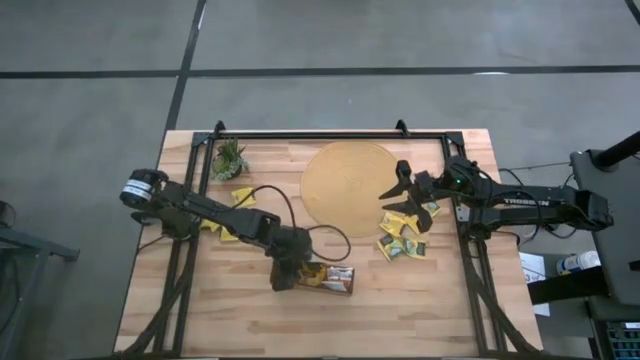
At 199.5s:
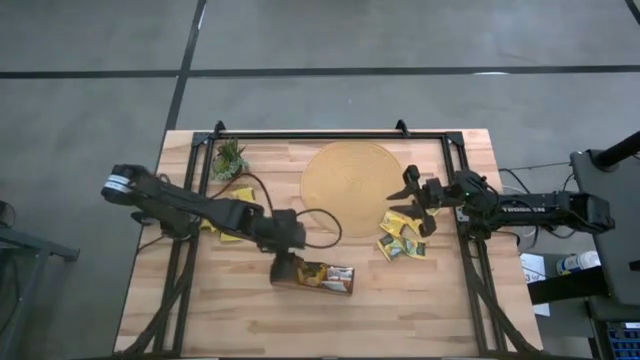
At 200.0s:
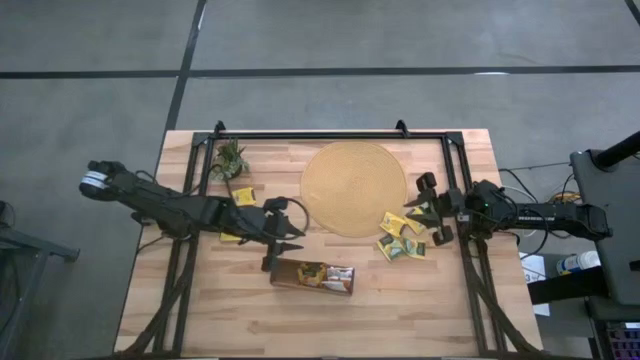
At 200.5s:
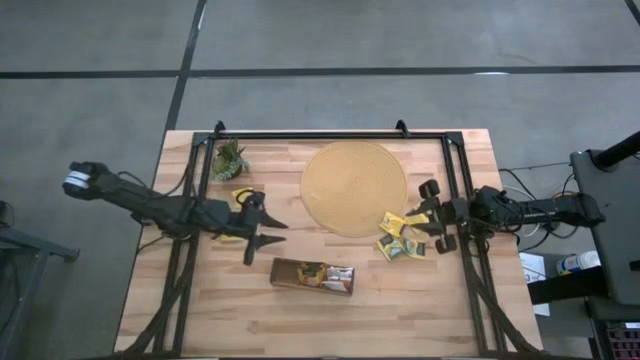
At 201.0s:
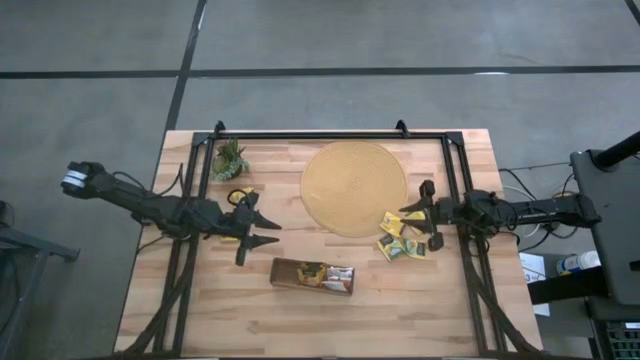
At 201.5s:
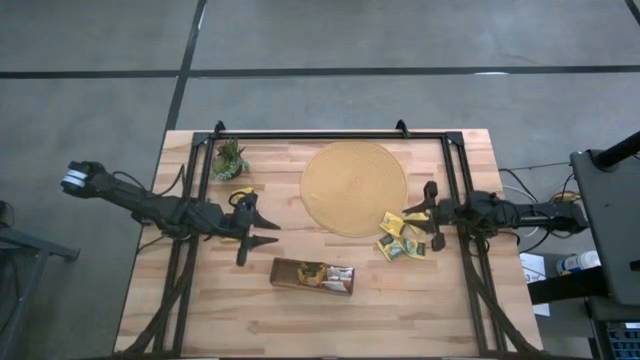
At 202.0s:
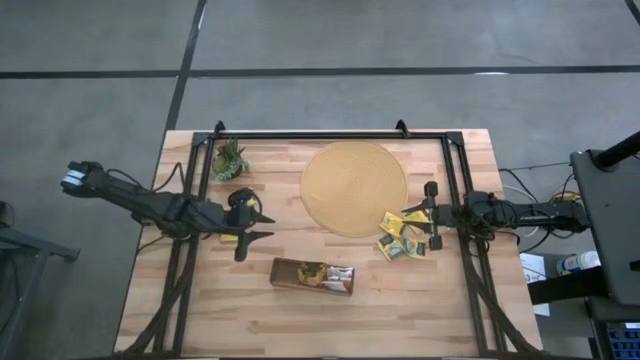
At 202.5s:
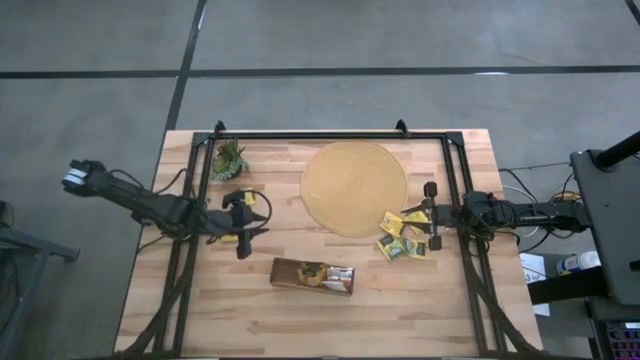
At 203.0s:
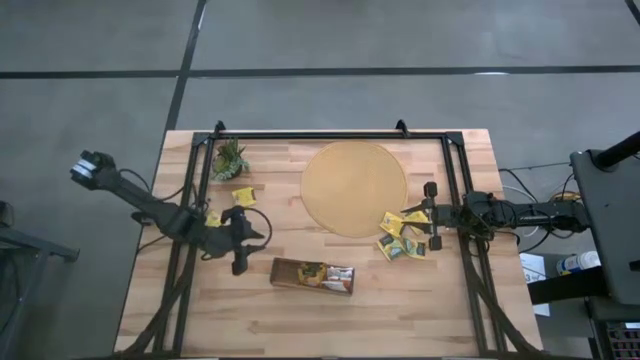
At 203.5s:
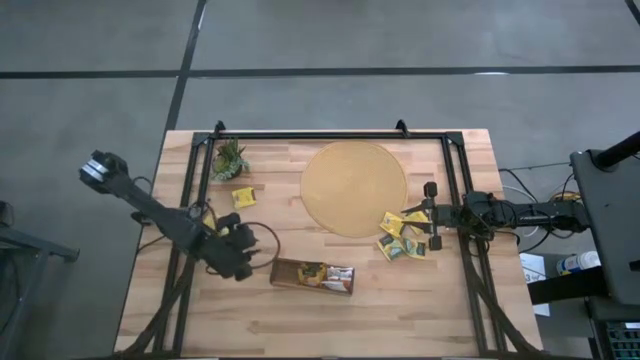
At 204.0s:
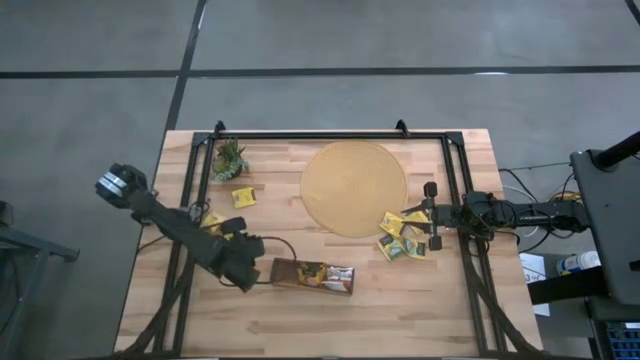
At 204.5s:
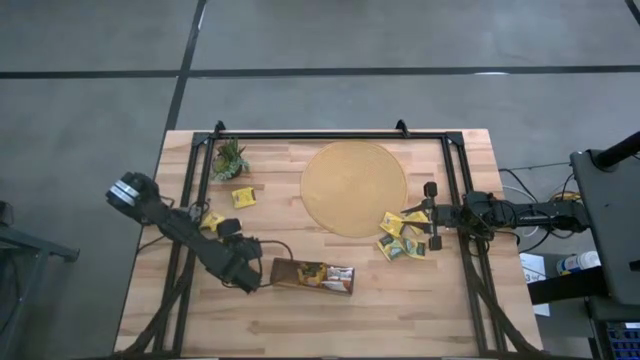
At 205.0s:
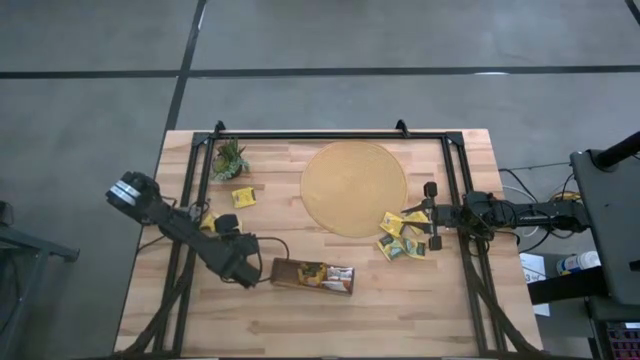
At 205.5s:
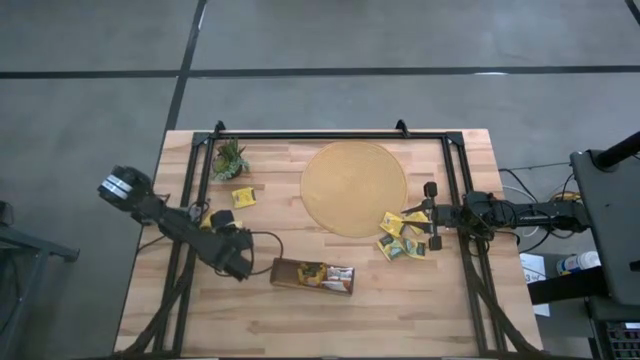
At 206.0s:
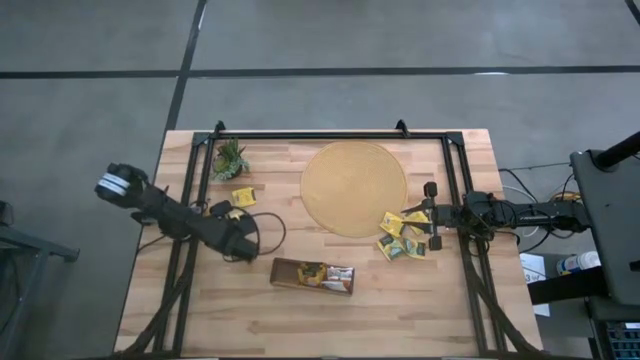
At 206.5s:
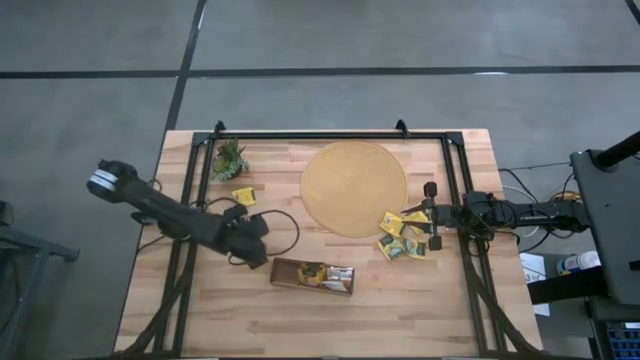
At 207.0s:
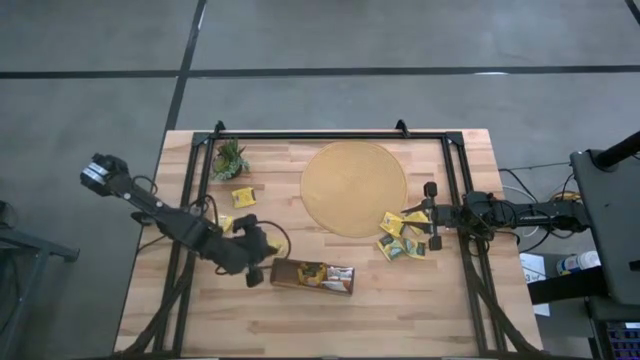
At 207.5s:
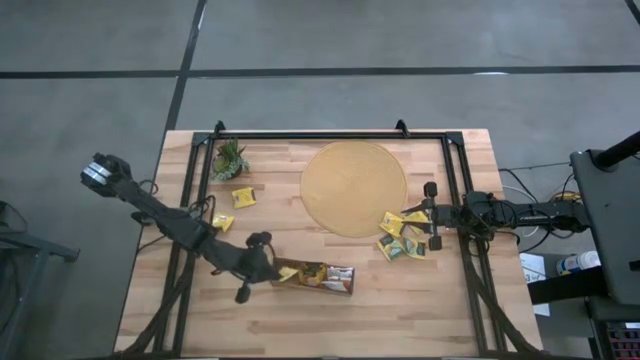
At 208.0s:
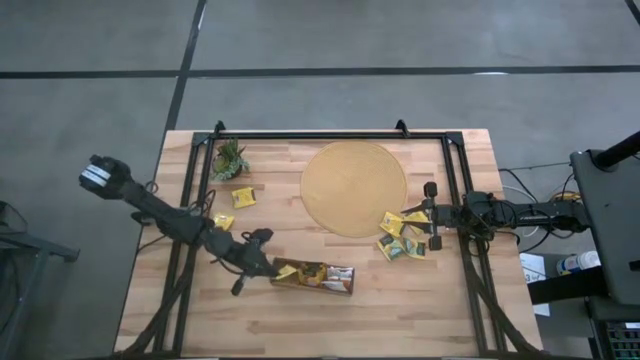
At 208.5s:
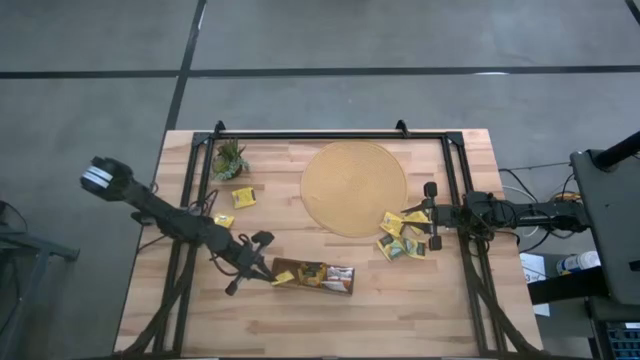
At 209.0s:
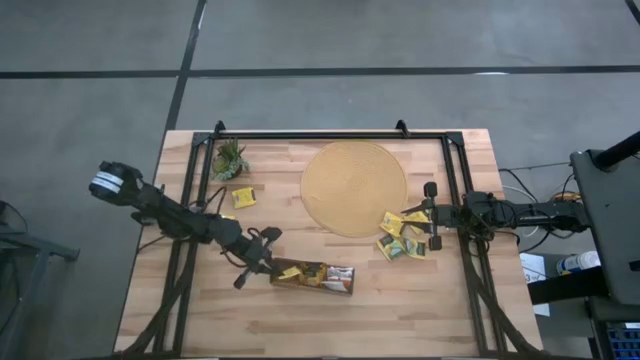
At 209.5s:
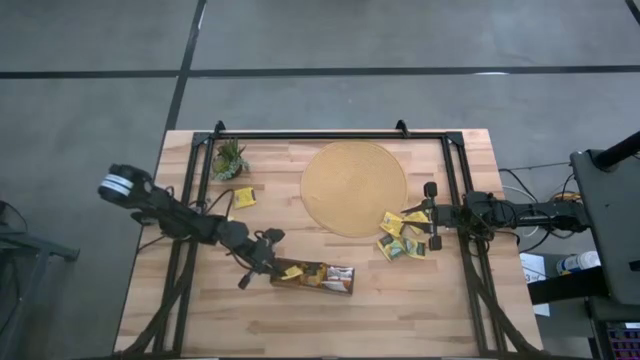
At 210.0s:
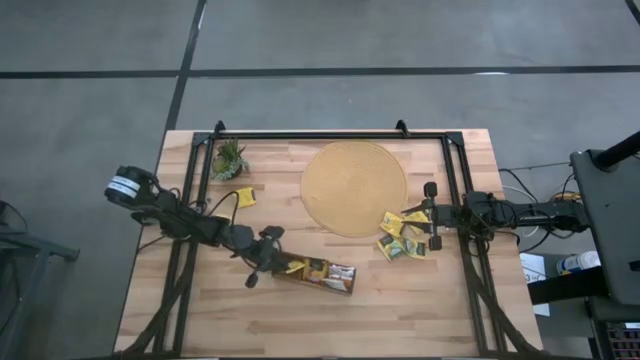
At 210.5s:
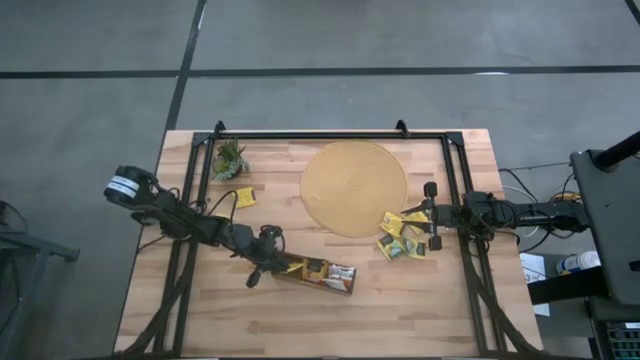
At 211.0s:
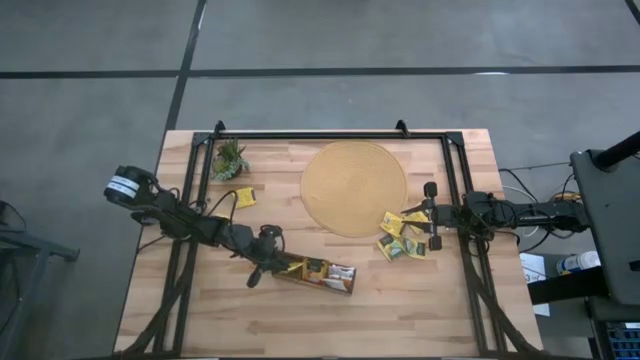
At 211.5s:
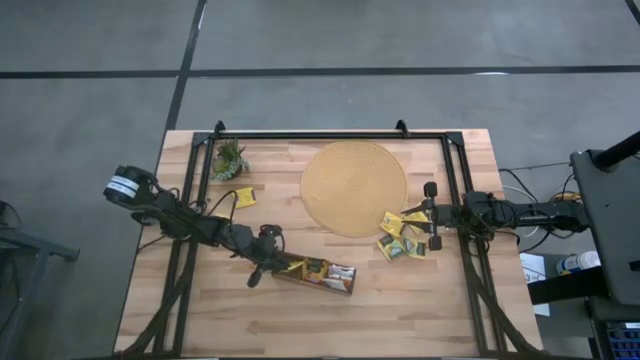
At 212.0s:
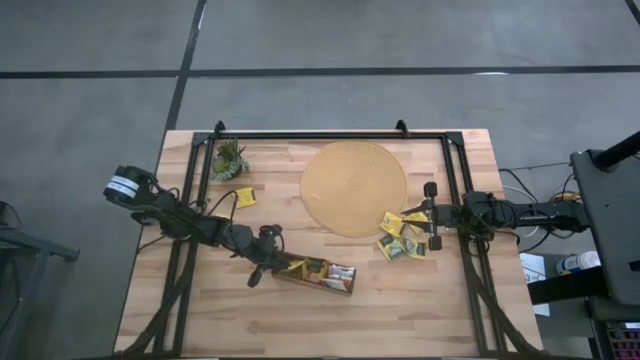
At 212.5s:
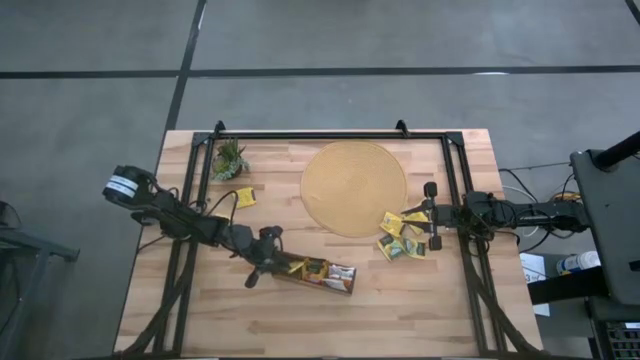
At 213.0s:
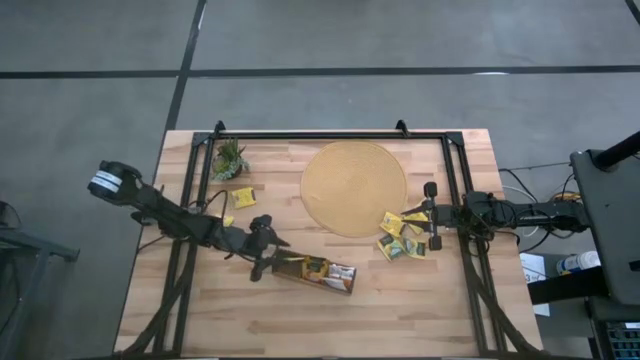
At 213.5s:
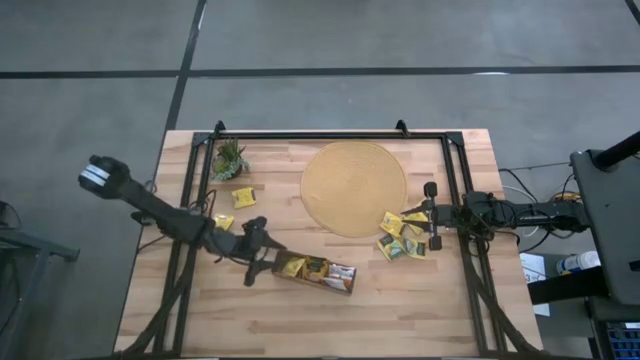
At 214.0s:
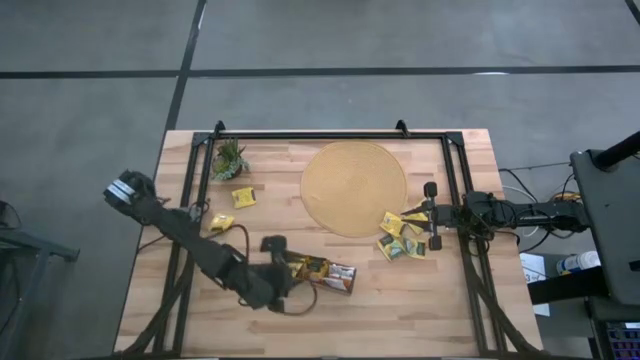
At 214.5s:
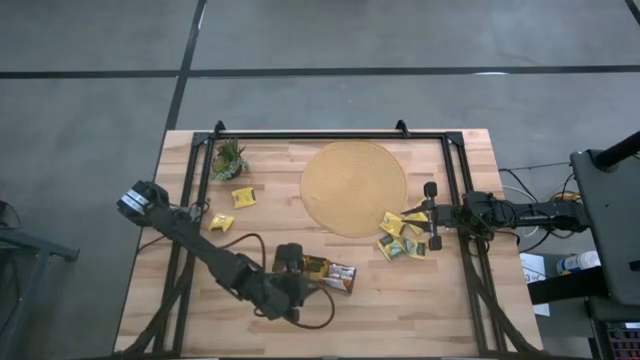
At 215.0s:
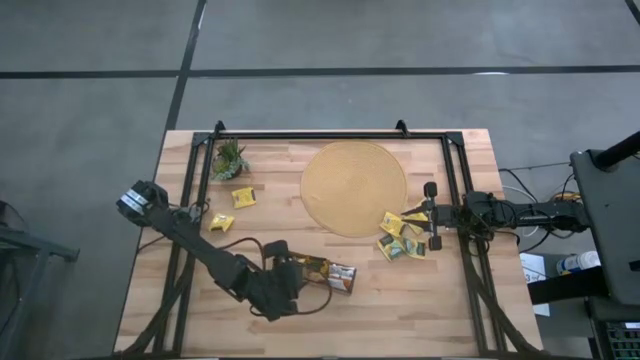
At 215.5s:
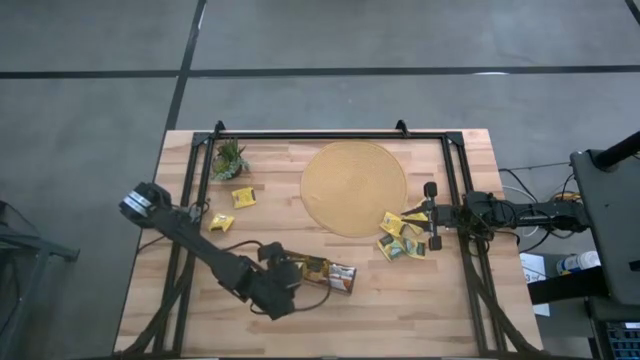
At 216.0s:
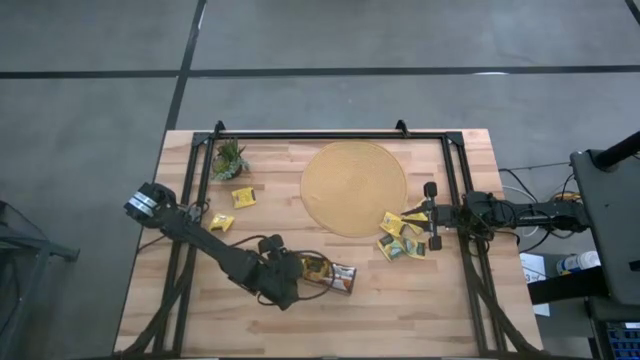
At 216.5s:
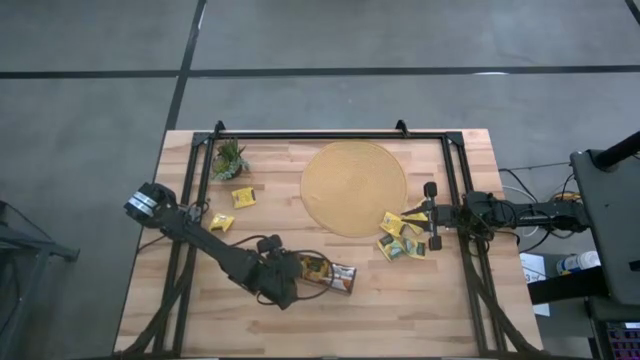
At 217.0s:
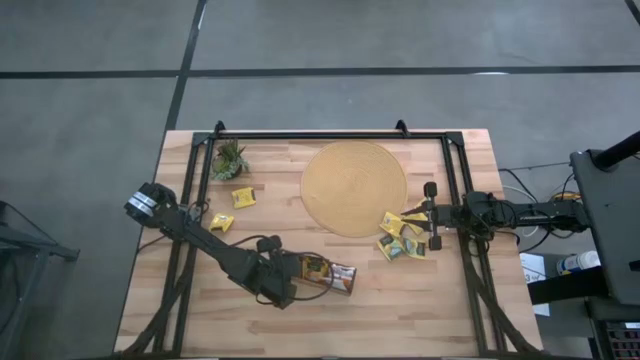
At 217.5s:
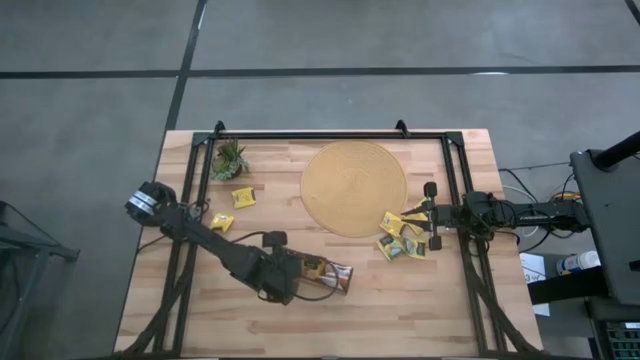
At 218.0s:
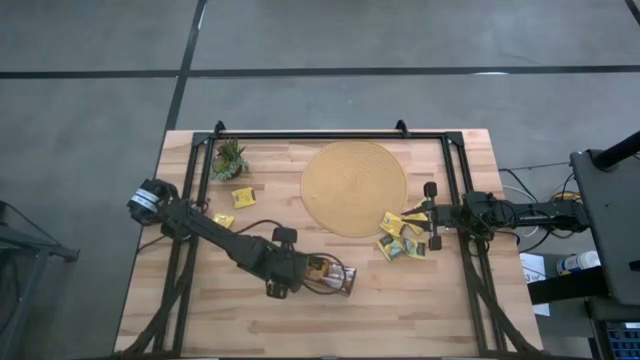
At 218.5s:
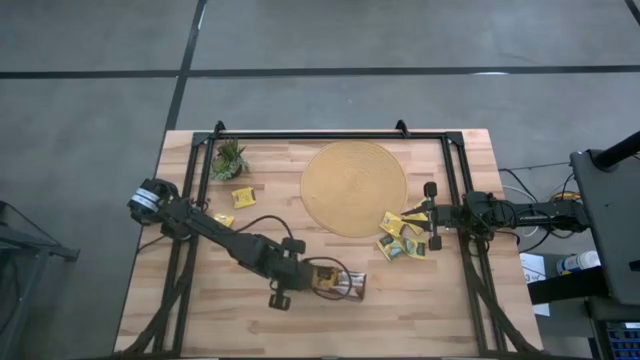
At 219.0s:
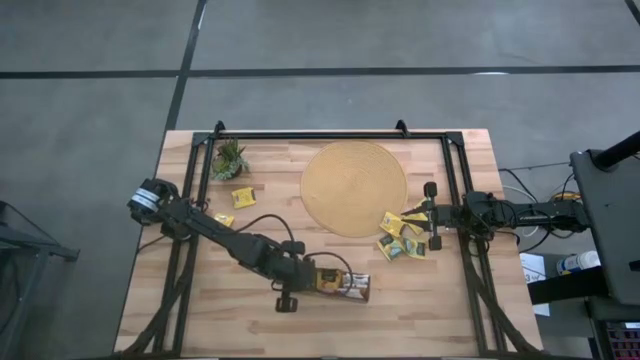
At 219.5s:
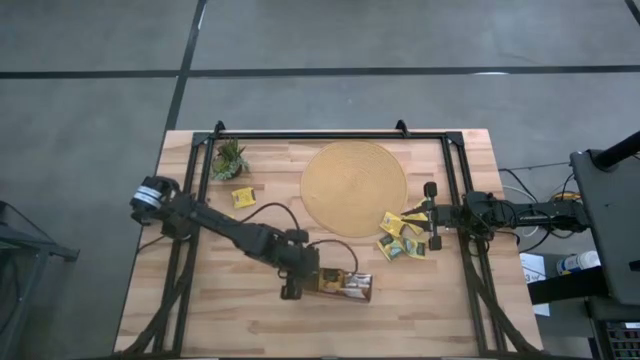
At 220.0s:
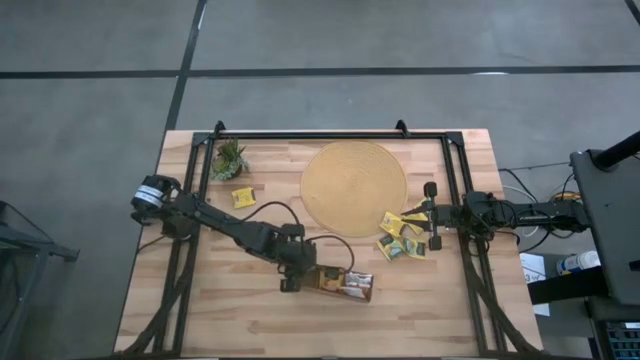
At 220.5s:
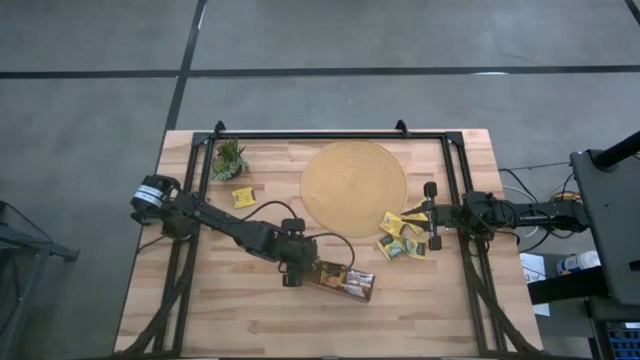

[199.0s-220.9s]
Task: Pick & Place Tea
Put the yellow tea bag into the left section of the wooden organizer
